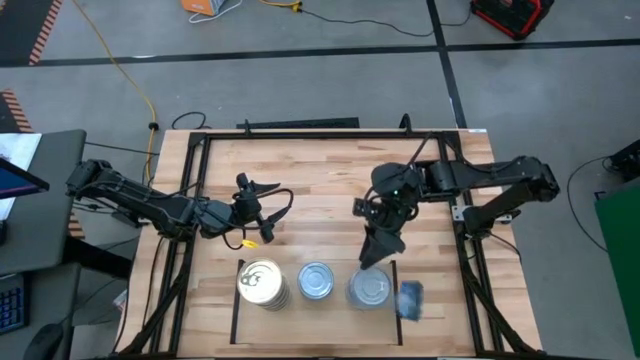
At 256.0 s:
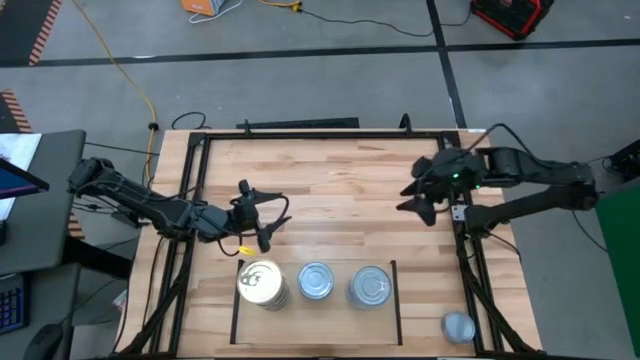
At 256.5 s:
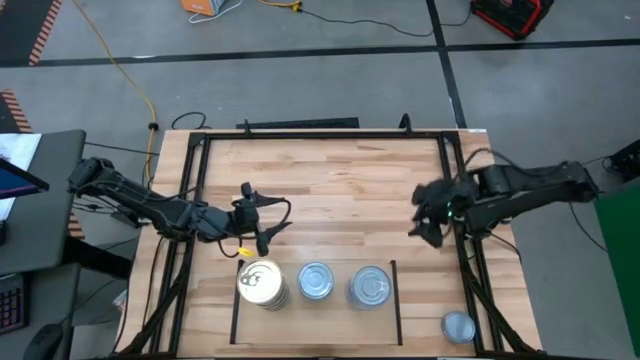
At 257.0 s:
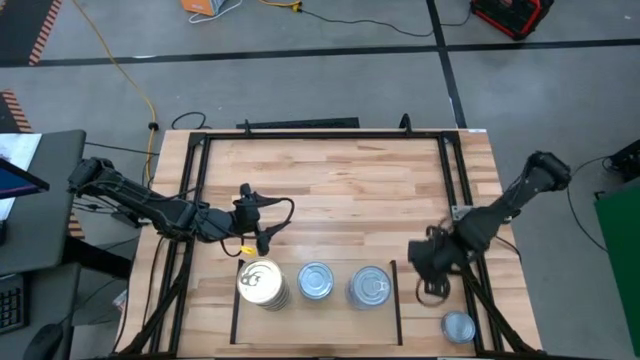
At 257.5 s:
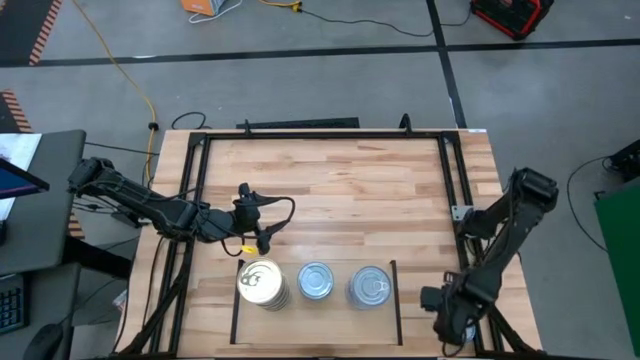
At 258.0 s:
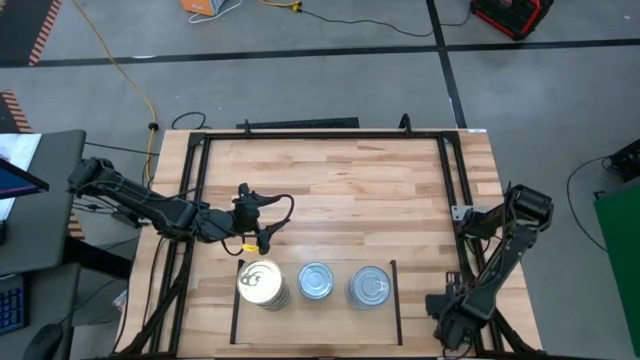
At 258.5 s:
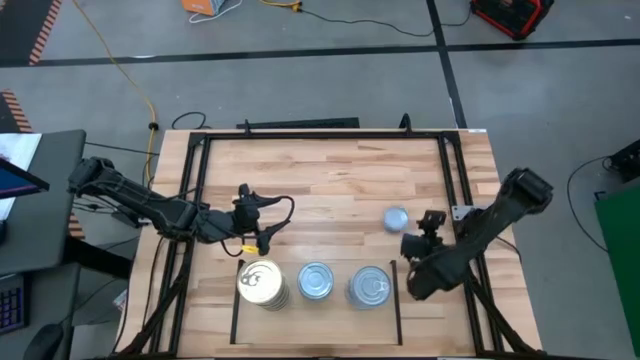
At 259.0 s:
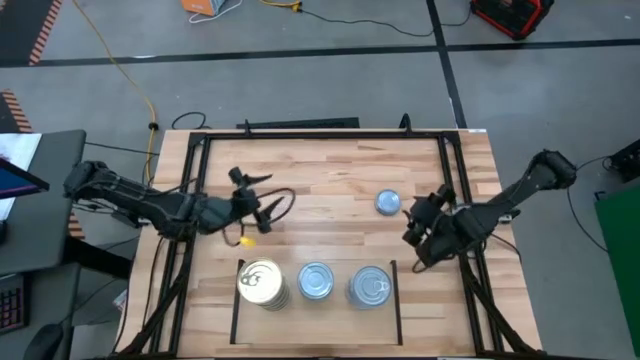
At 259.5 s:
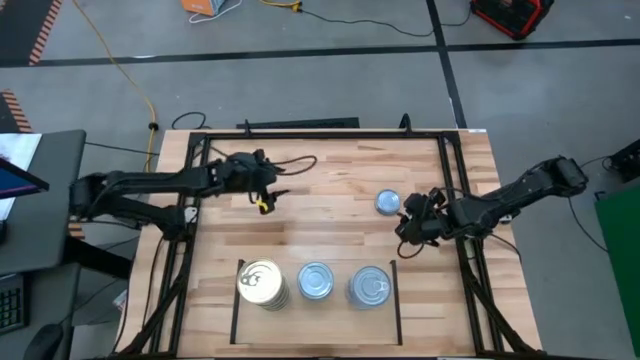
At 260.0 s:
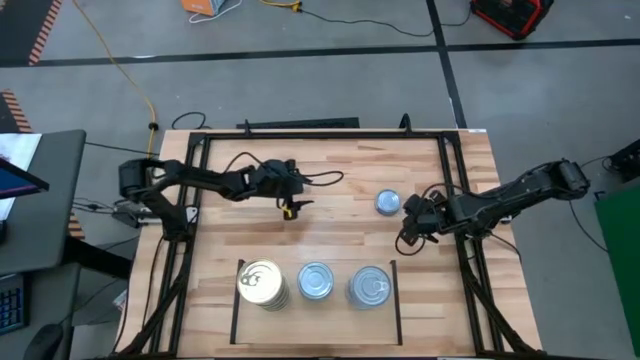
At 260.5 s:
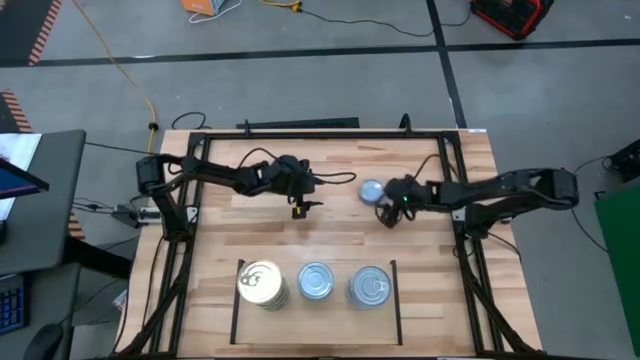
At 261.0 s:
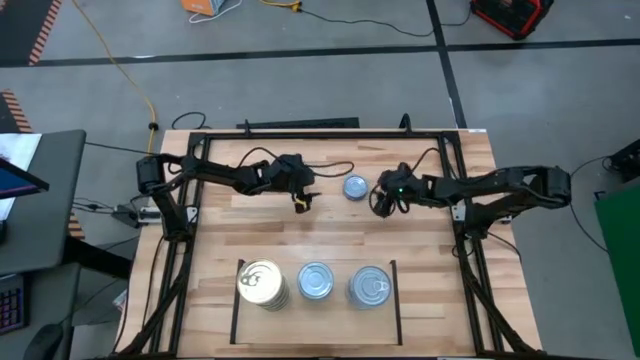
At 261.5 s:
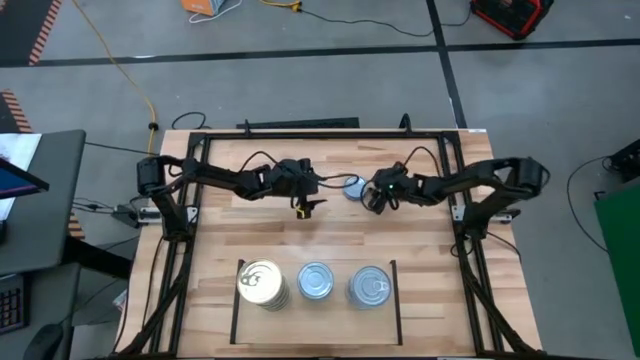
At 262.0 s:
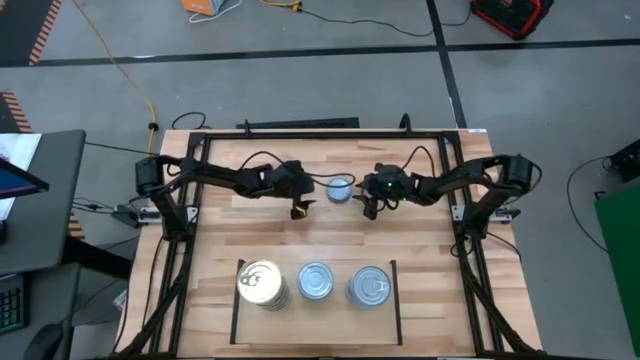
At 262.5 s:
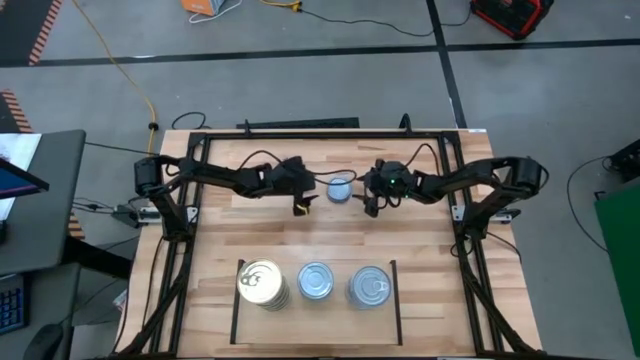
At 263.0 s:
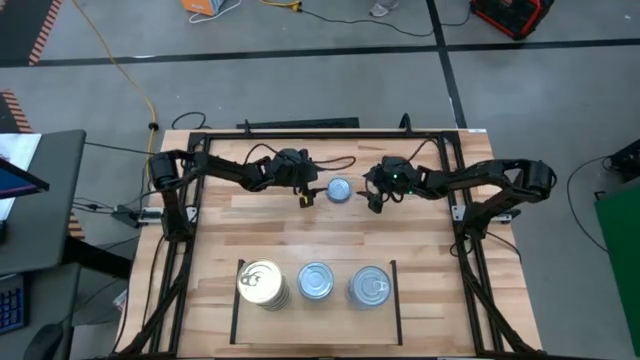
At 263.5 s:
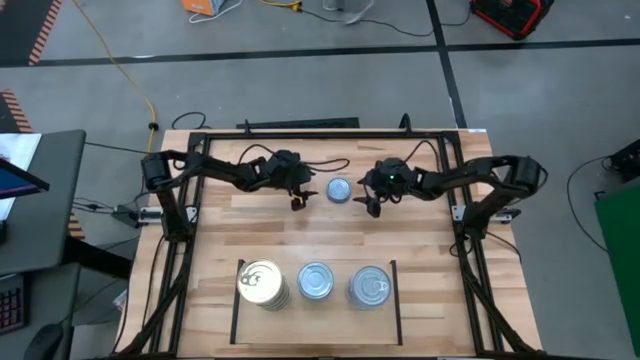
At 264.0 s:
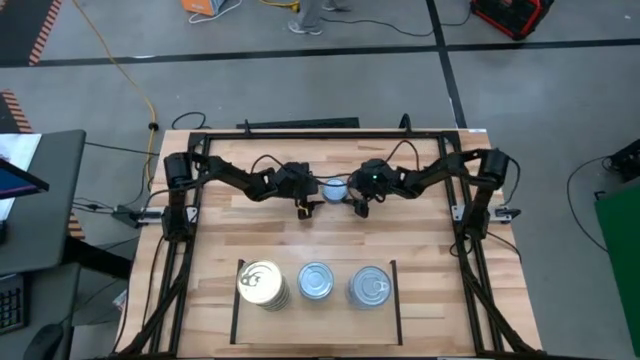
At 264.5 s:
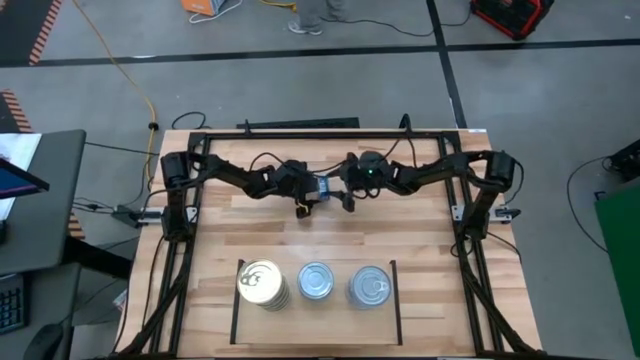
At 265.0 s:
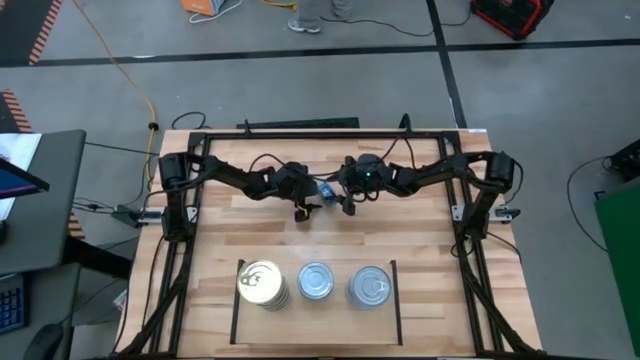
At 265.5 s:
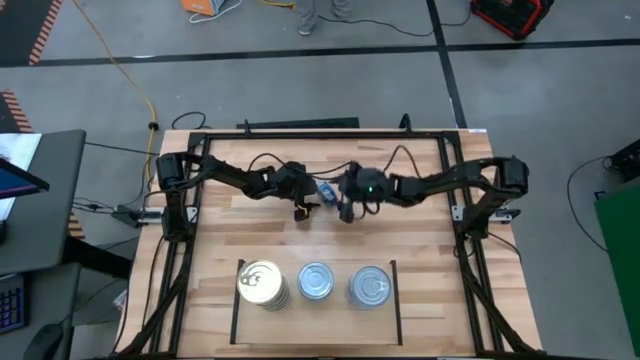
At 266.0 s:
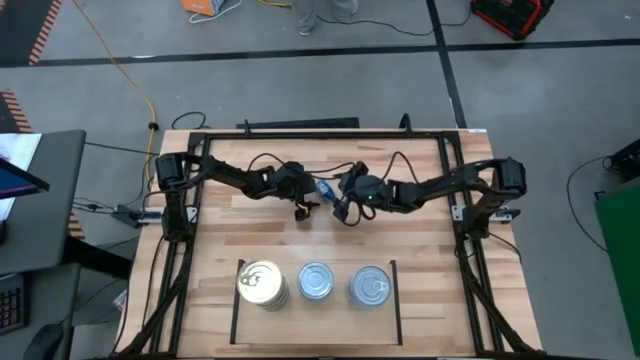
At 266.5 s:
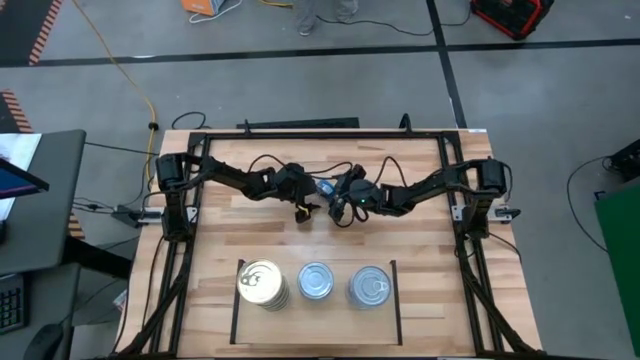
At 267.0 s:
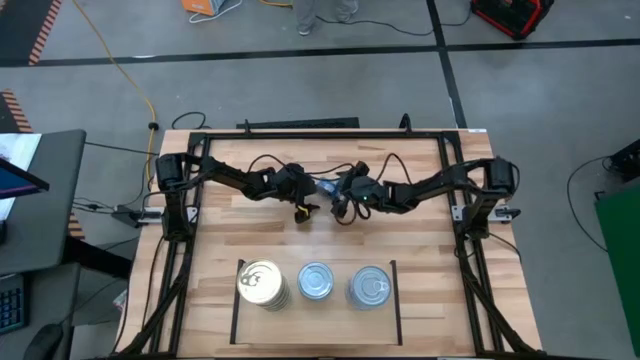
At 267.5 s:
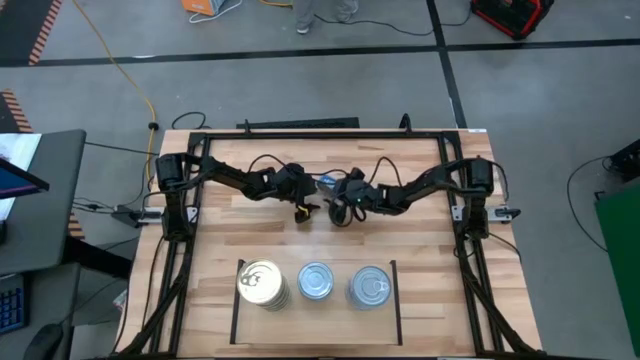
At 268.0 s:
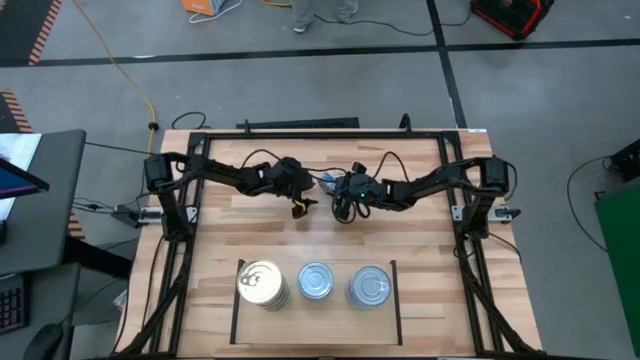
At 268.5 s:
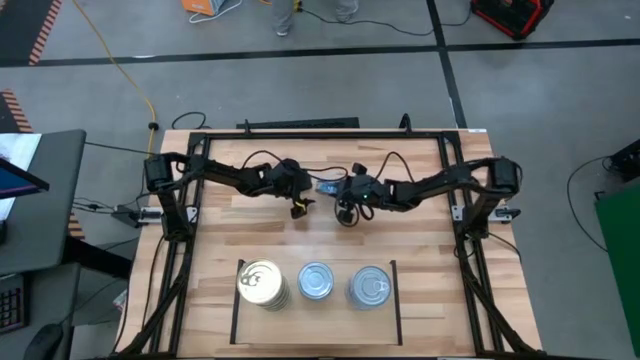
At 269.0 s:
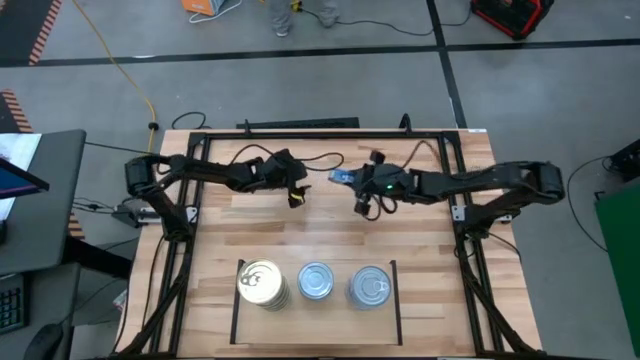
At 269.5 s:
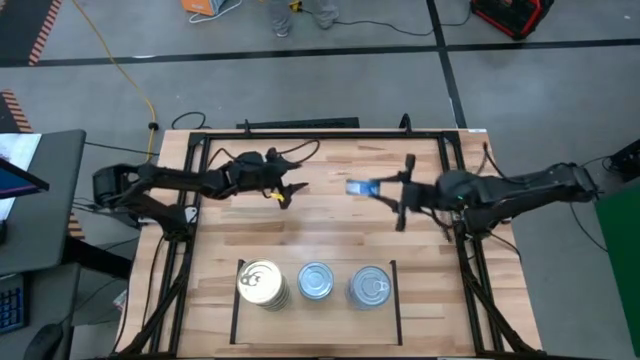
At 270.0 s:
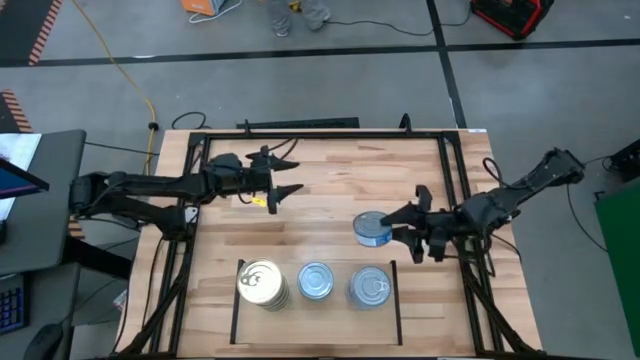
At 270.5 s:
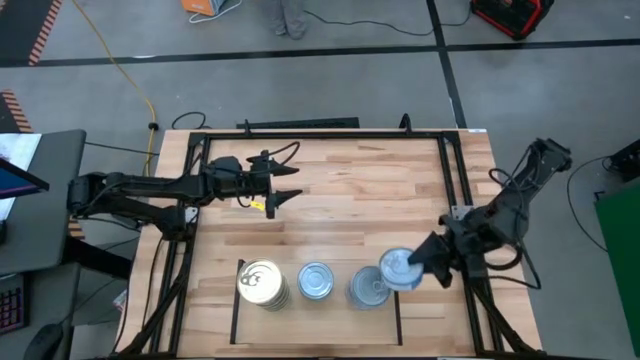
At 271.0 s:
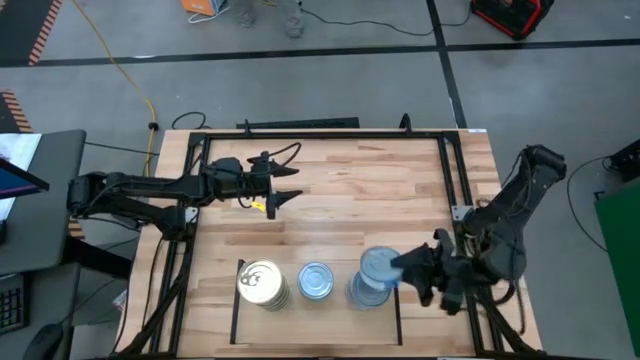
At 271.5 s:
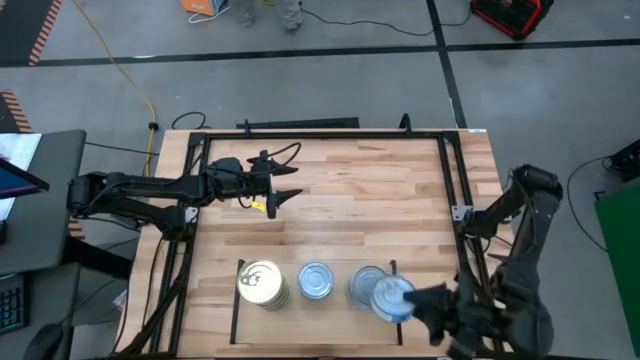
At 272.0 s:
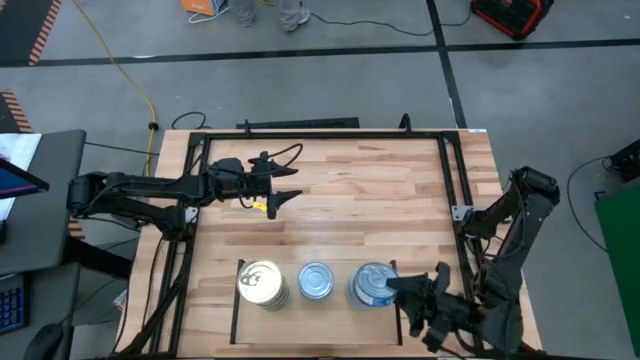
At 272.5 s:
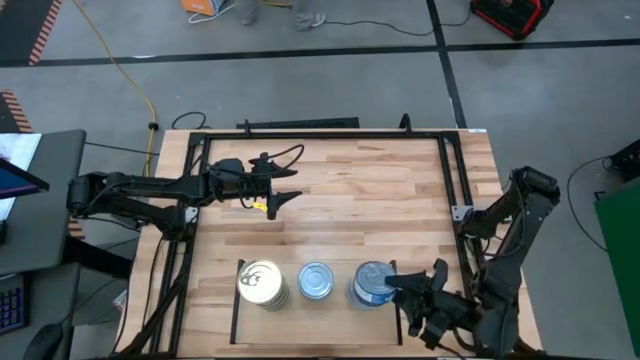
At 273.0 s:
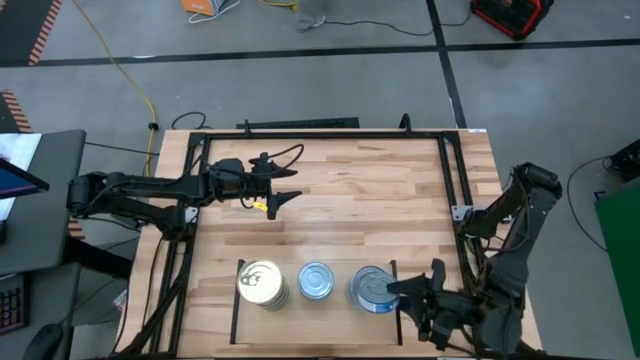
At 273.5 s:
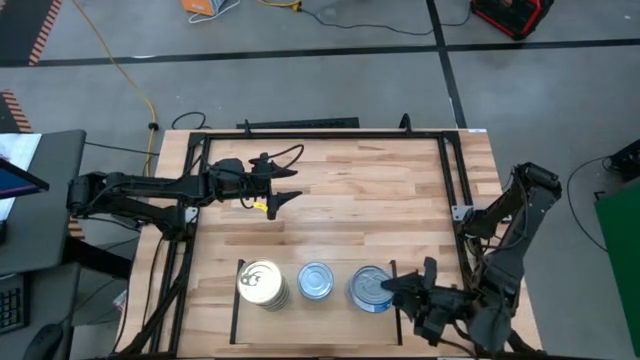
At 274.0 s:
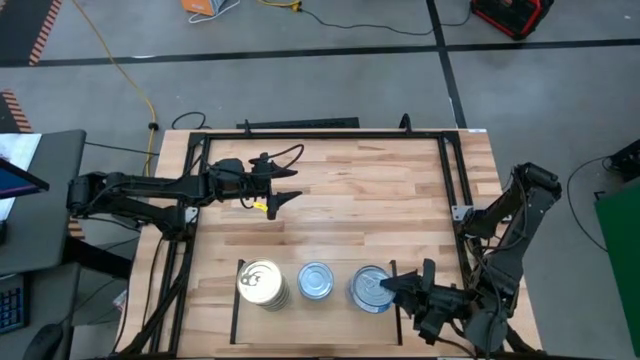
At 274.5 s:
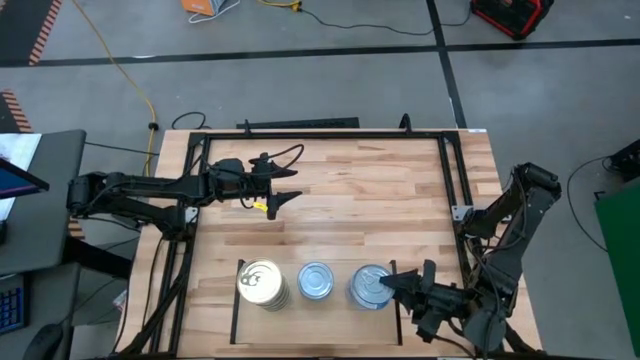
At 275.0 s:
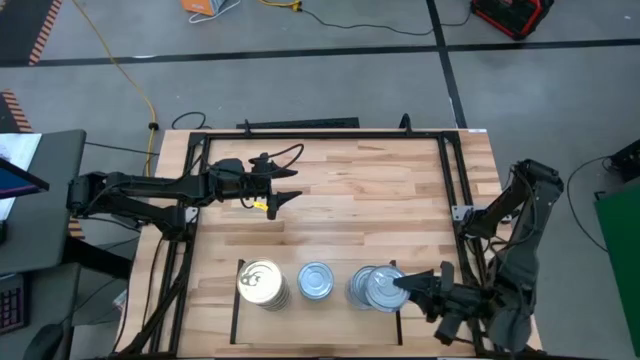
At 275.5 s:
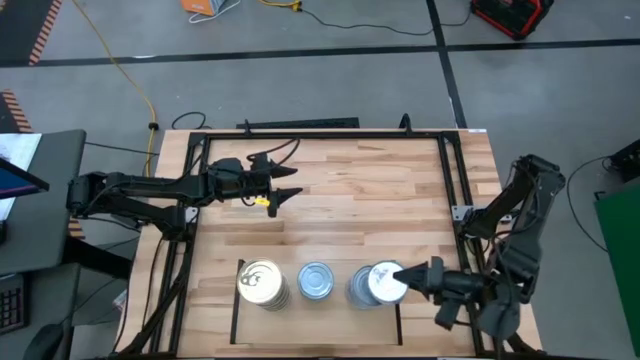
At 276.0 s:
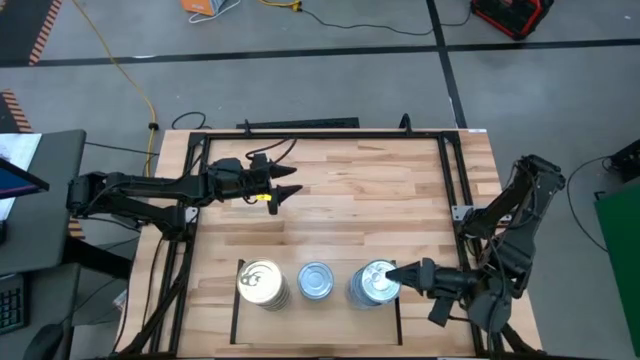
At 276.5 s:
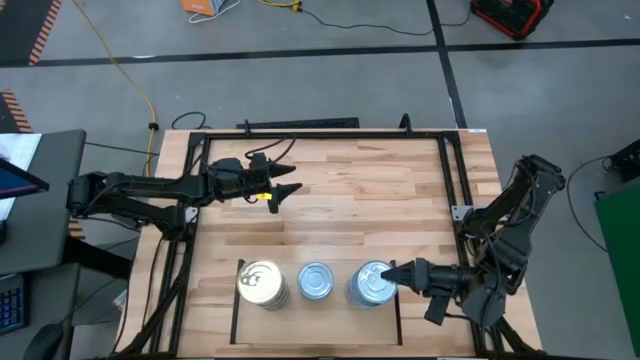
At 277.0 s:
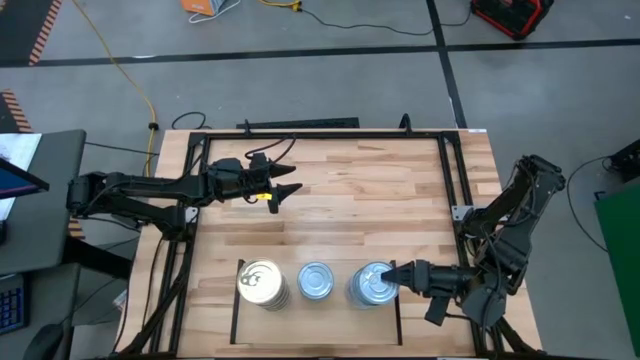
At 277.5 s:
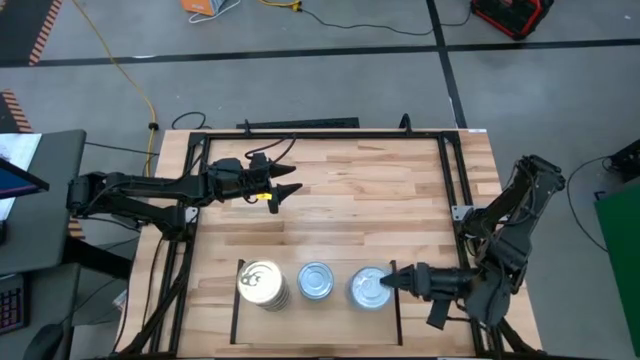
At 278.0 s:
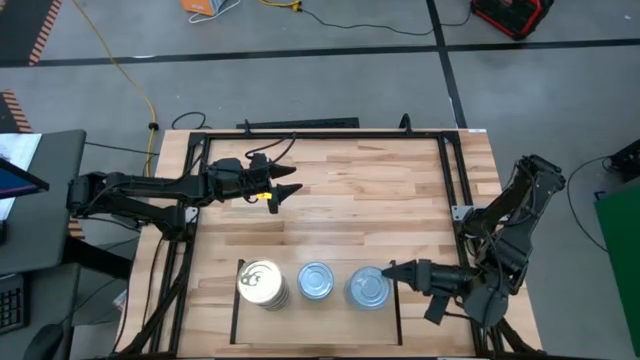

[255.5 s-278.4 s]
Task: Stack canned seafood by type on shelf
Put the blue tuna can on the top of the left stacked tuna cans on the shelf
